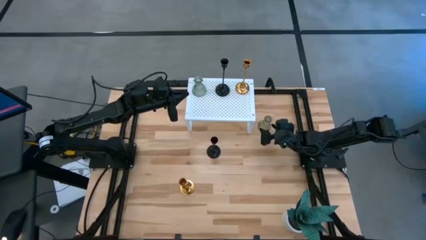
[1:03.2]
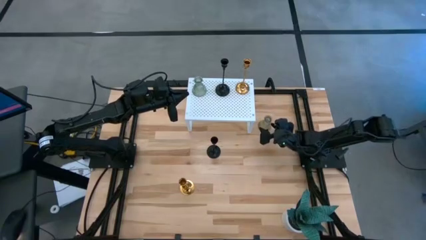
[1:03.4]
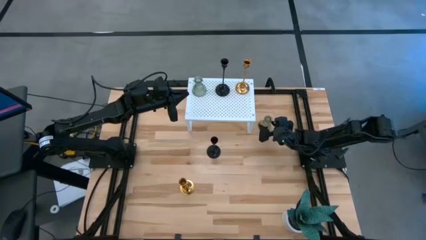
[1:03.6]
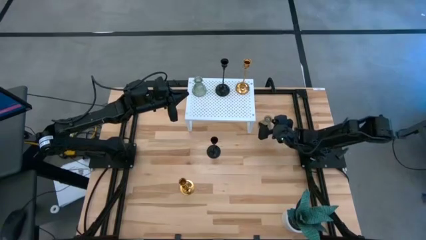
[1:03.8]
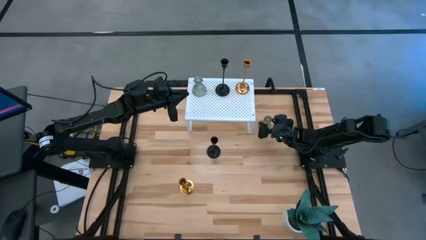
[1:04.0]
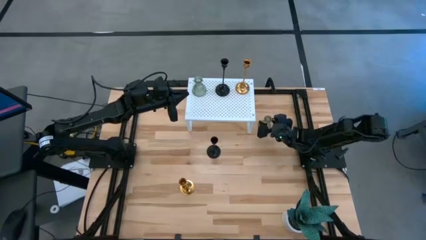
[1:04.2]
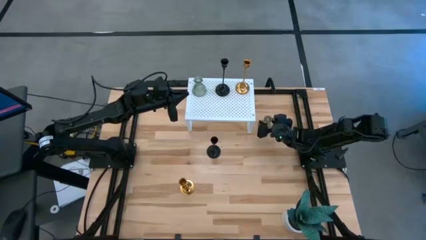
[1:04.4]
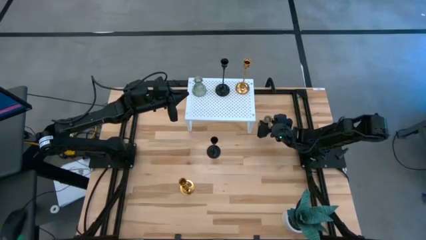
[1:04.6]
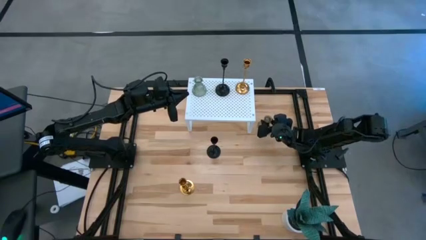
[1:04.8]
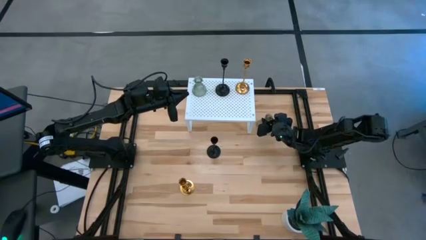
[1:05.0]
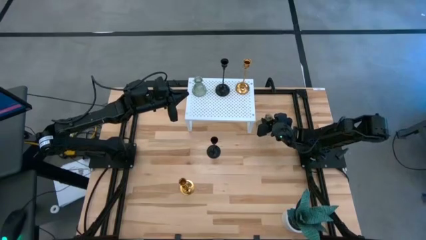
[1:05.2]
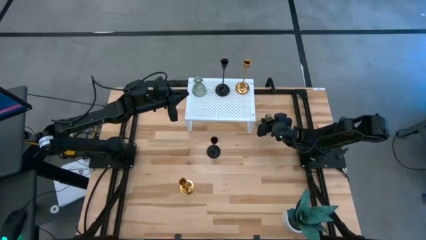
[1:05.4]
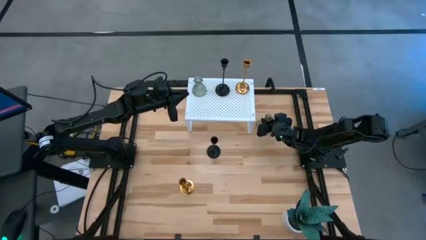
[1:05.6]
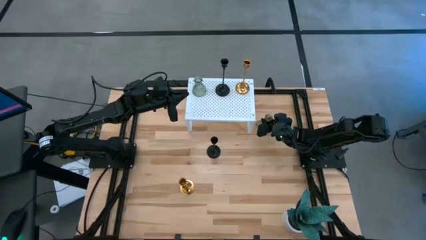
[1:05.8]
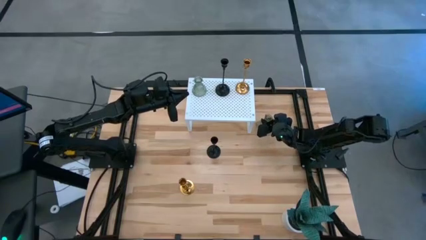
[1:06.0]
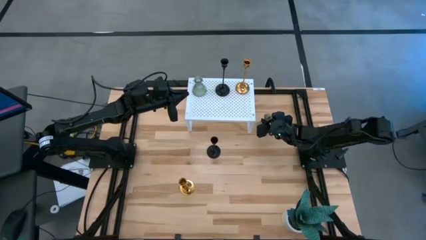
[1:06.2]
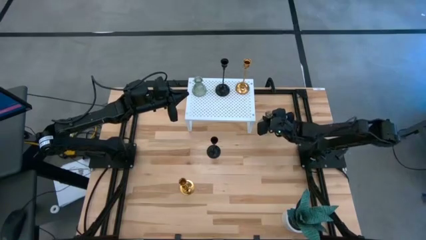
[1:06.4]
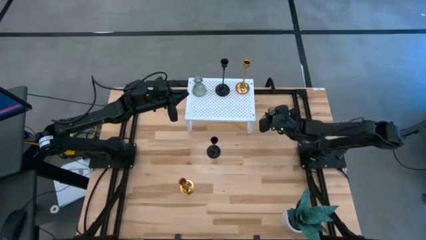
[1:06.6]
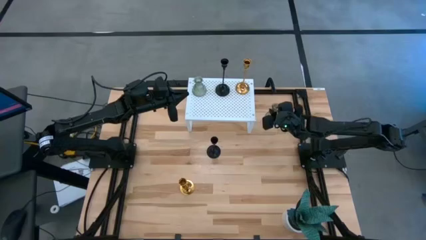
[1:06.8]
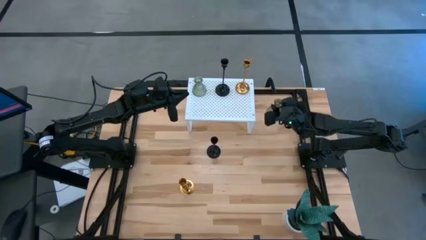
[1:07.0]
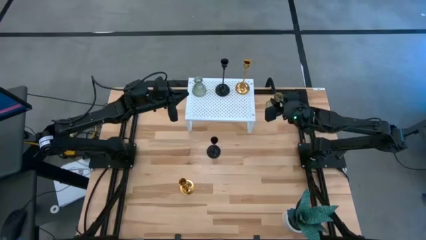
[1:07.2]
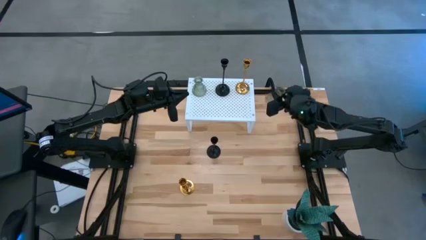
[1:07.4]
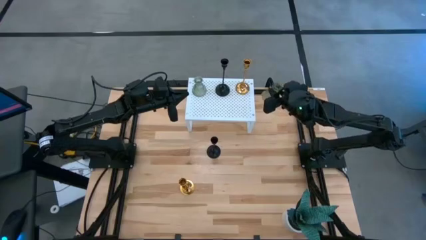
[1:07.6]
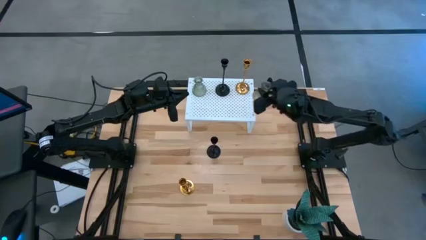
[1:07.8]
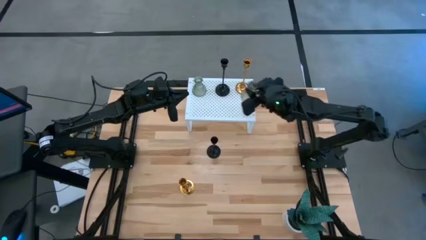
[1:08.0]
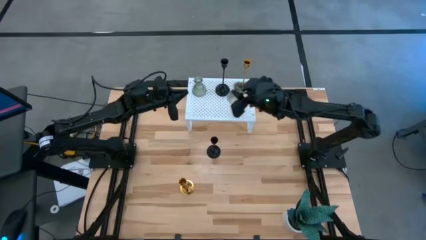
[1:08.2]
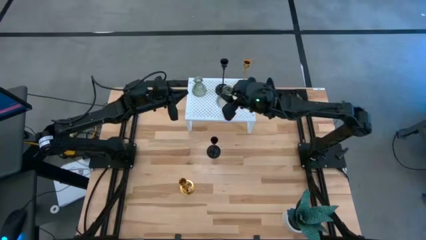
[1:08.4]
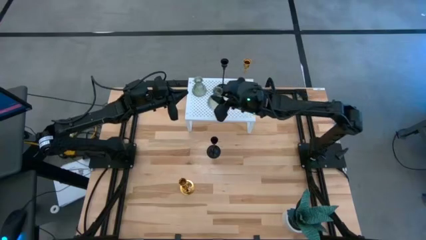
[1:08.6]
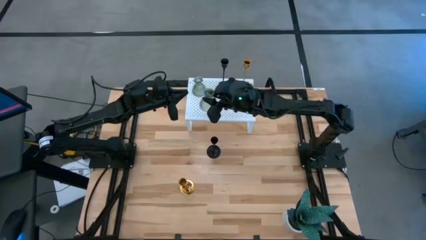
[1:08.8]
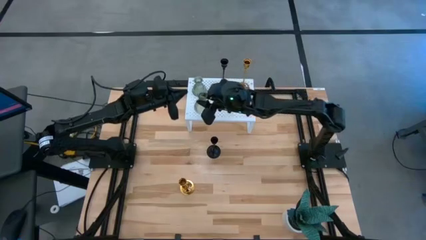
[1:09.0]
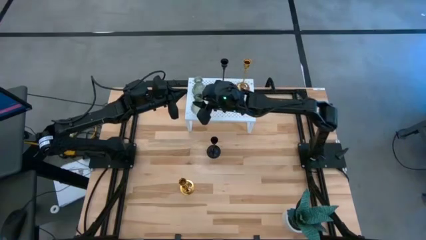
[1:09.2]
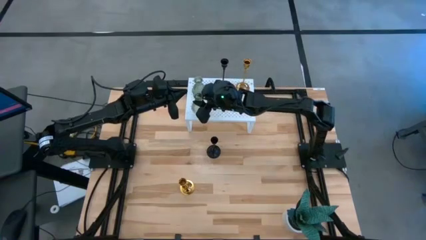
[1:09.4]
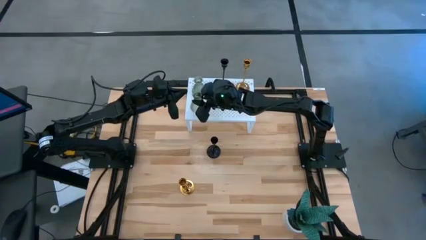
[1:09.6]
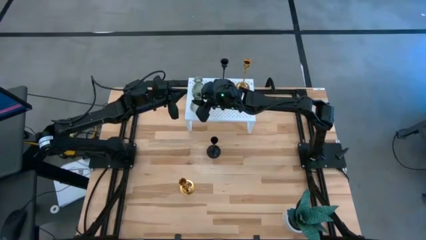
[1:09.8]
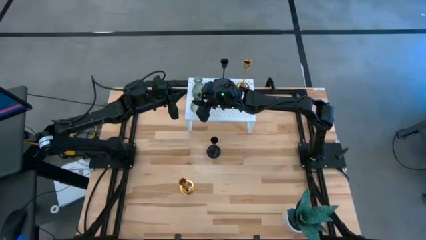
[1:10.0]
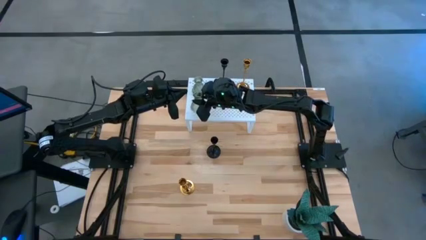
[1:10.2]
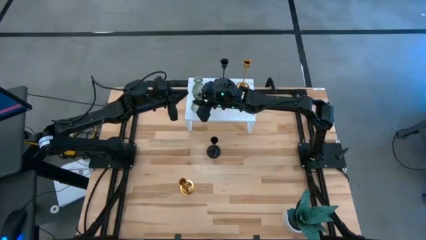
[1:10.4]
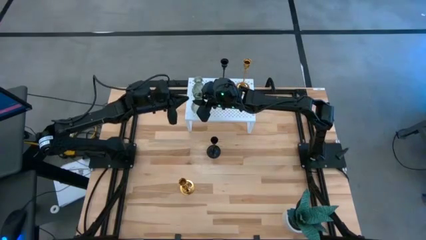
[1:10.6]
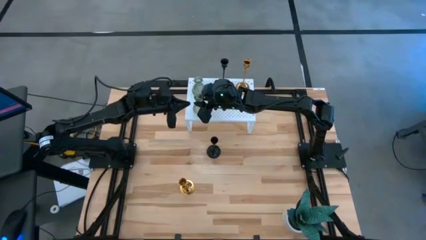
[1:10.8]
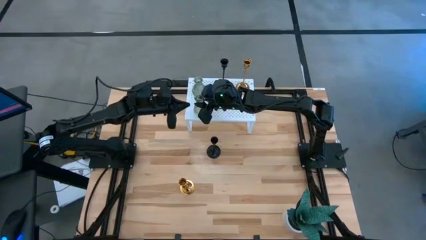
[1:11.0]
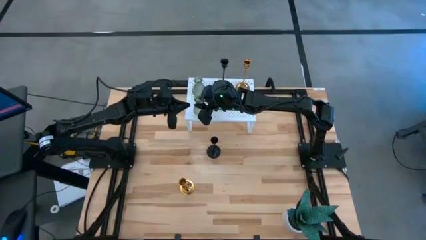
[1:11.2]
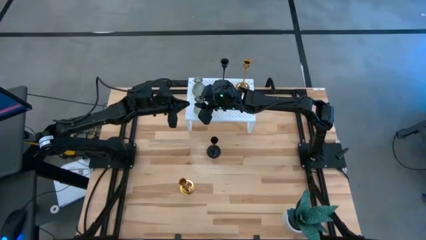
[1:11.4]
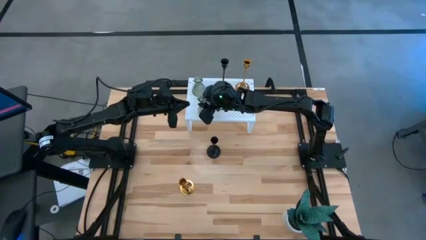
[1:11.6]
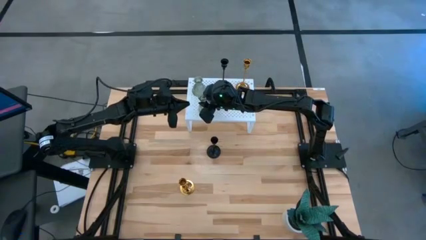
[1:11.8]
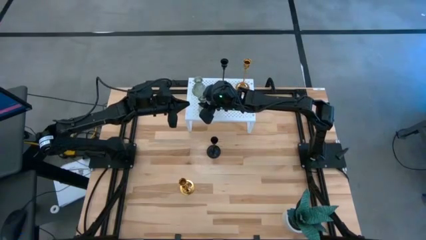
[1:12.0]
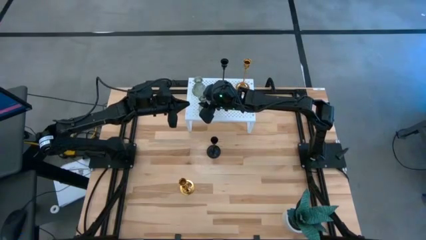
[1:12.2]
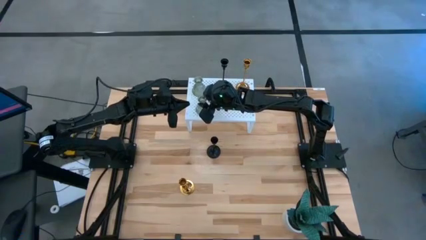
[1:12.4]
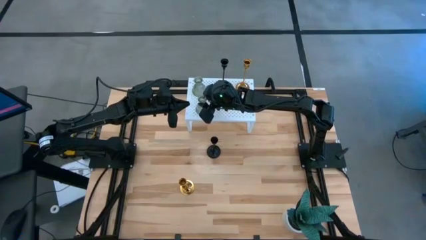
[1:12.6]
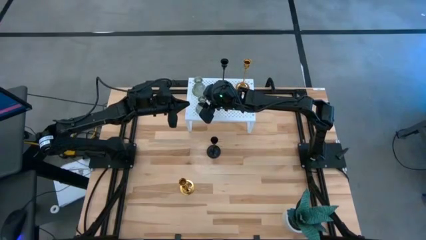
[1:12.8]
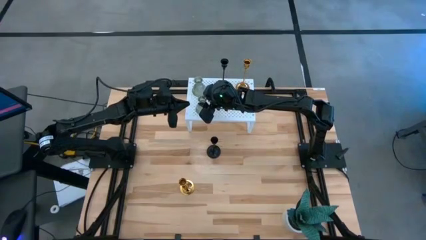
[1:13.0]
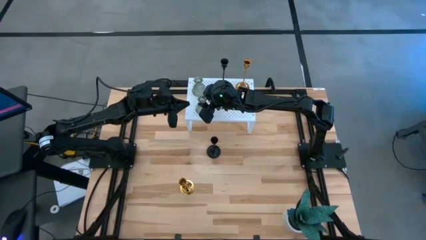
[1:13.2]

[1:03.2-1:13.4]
Task: Pick & Place candle stick holders
Align the transparent candle holder with the transparent candle holder on the shelf

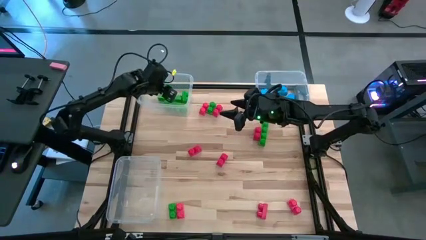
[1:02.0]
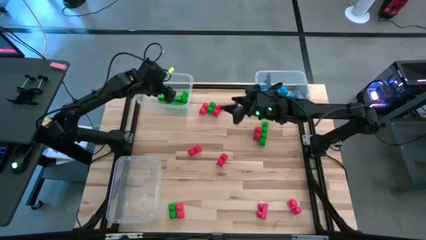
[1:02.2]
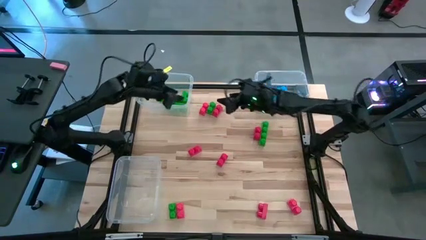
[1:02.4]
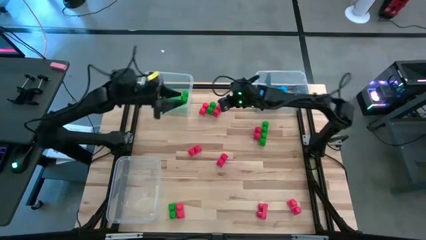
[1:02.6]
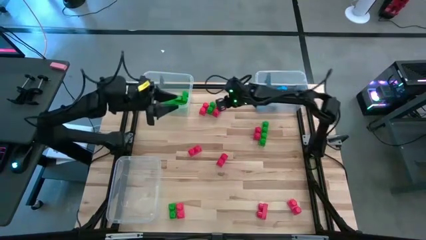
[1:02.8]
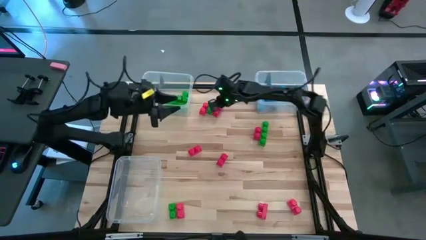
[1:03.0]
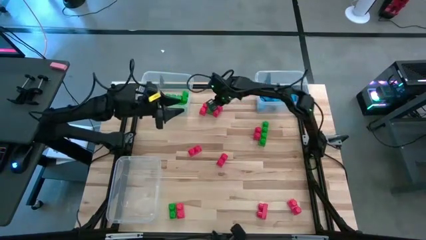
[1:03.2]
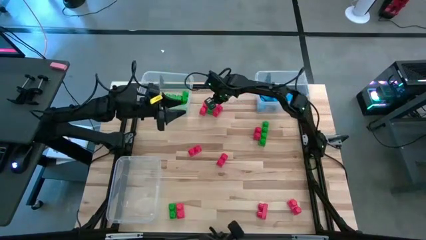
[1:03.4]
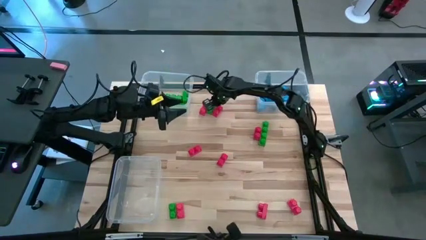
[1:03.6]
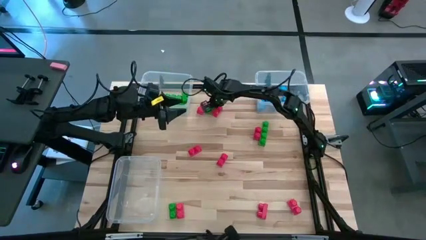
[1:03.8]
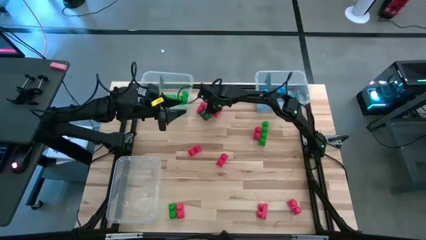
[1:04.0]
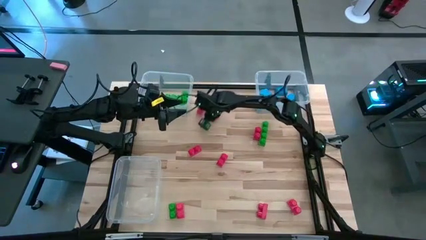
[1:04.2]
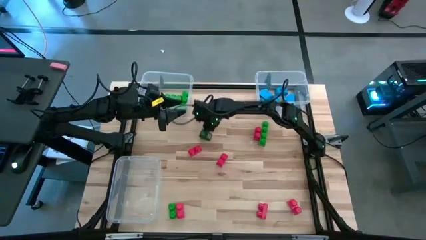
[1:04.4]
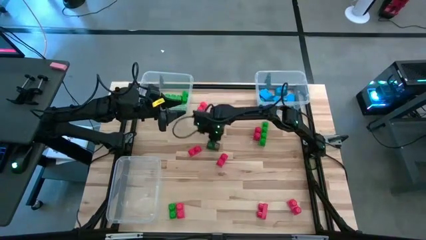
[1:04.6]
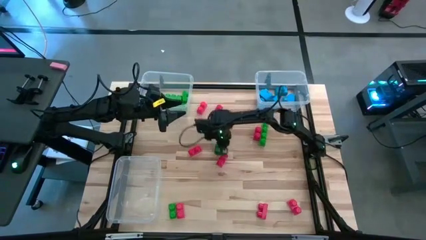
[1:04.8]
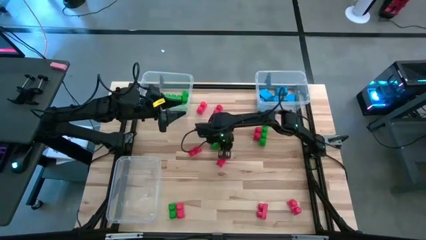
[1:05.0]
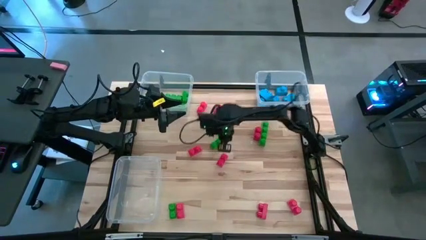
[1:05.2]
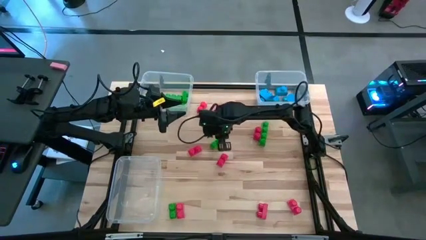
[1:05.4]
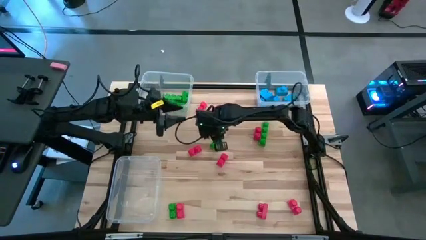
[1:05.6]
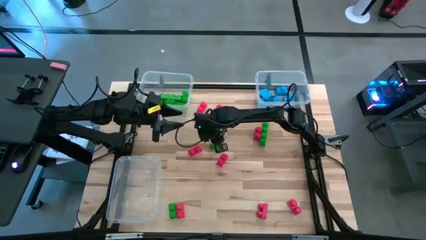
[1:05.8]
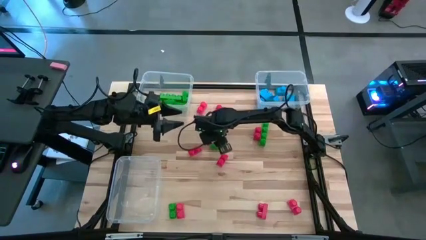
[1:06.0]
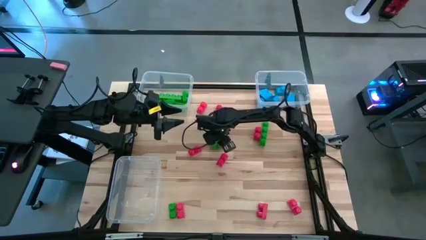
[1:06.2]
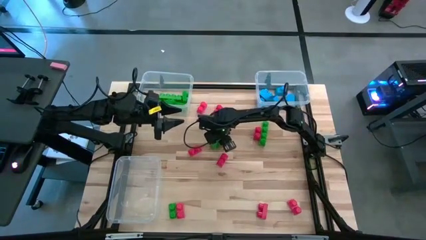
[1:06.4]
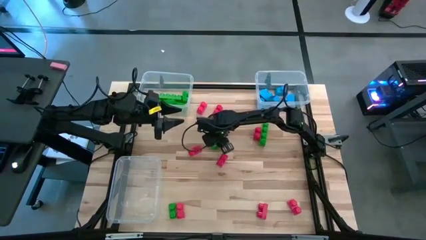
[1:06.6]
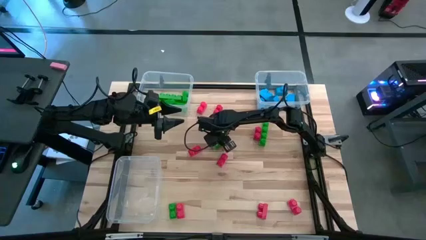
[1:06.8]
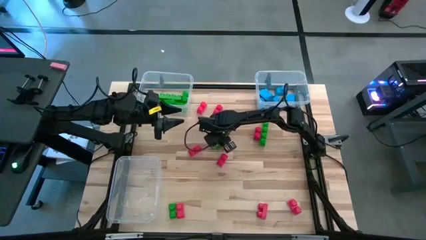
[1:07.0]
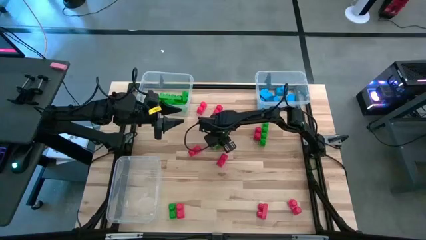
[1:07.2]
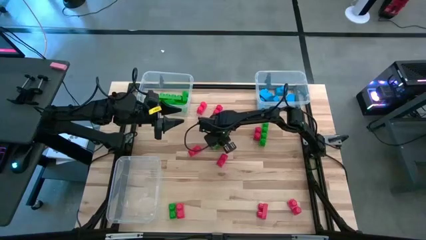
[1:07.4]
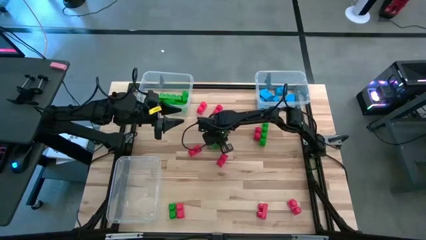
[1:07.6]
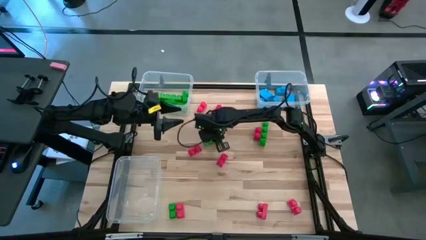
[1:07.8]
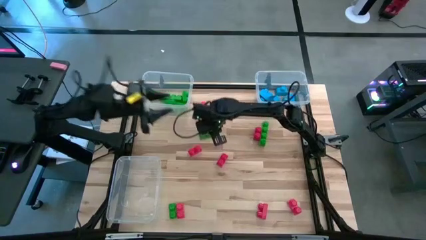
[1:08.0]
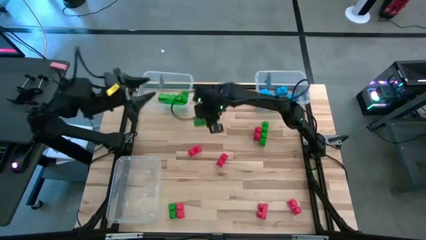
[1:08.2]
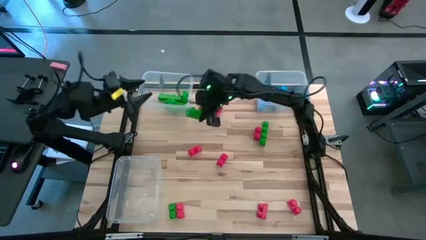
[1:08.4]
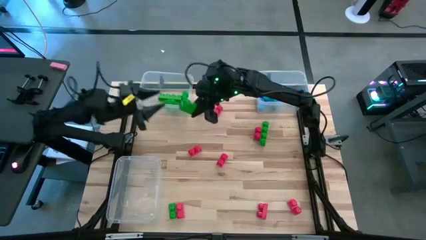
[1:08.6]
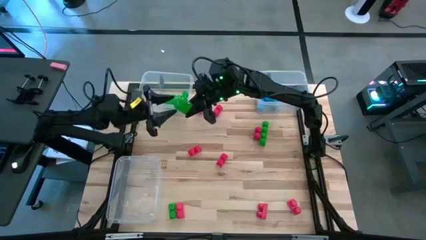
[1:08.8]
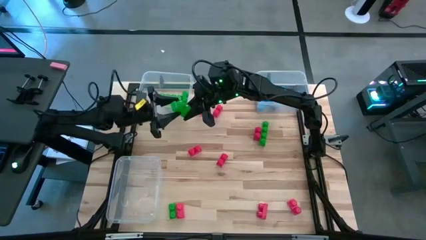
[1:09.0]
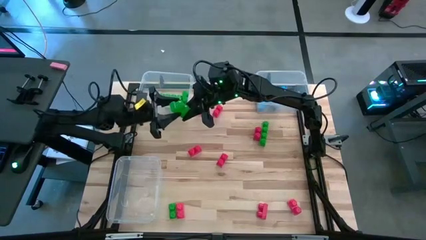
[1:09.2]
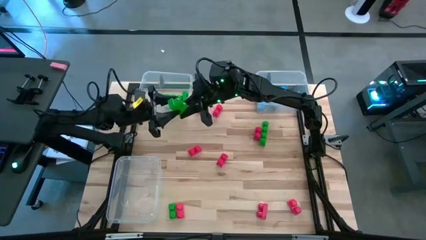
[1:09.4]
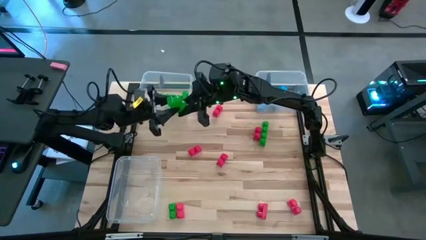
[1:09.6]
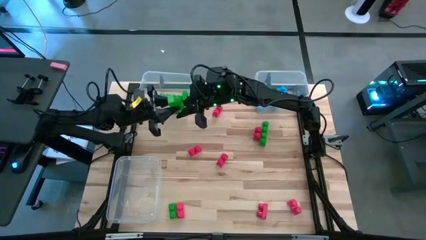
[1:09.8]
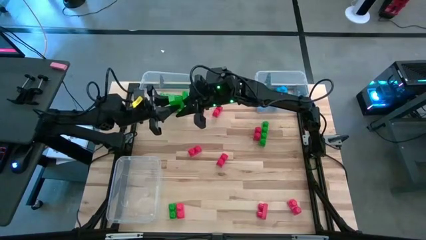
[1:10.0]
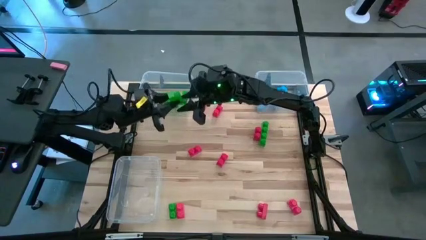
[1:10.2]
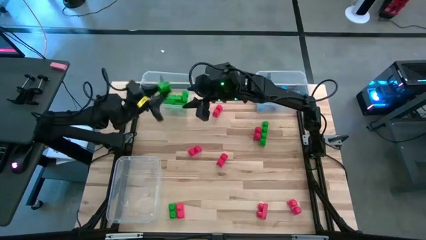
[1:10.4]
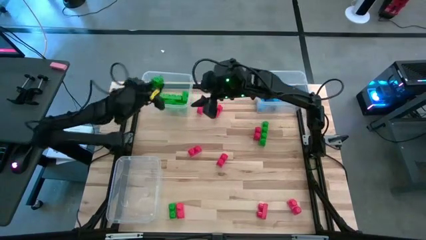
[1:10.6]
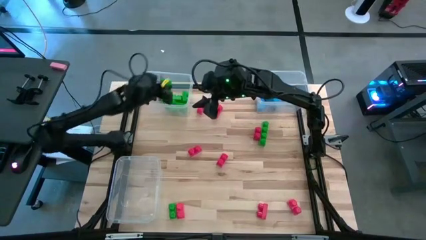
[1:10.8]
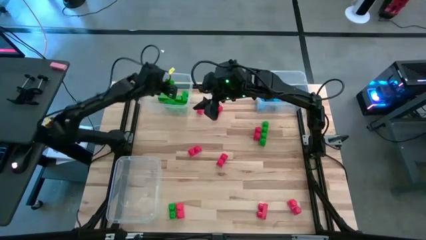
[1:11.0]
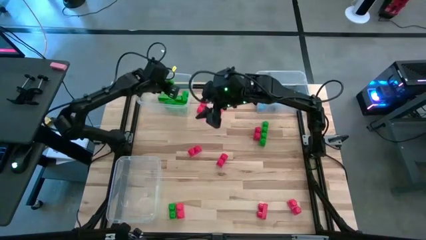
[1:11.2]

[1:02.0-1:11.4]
Task: Sort blocks
Put the green game piece into the top left transparent bin
